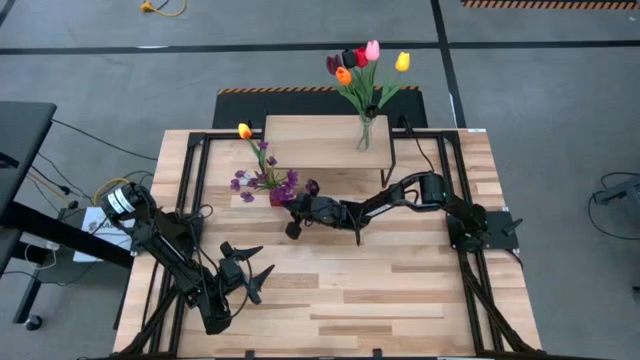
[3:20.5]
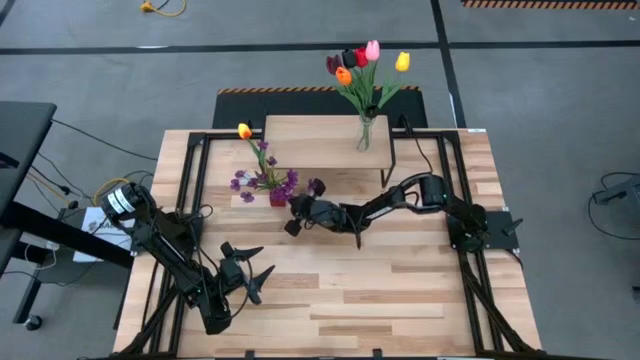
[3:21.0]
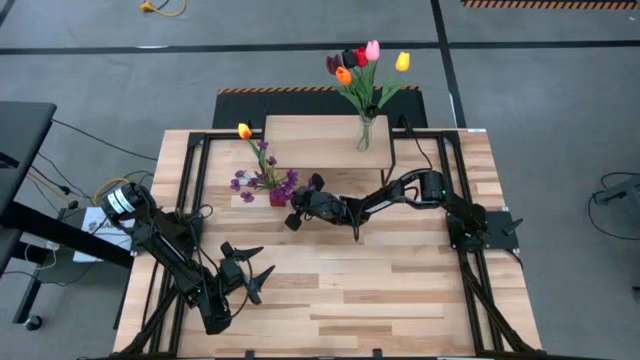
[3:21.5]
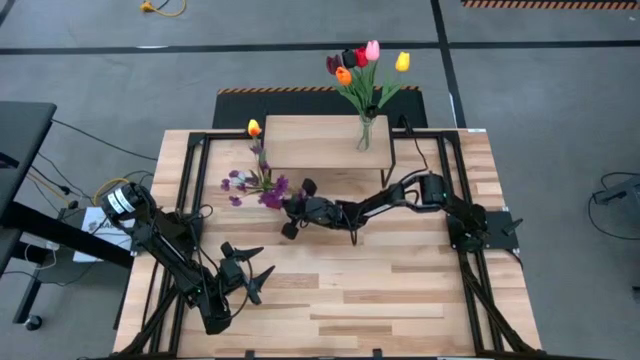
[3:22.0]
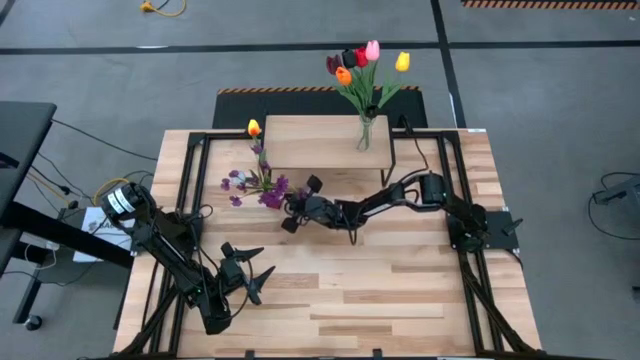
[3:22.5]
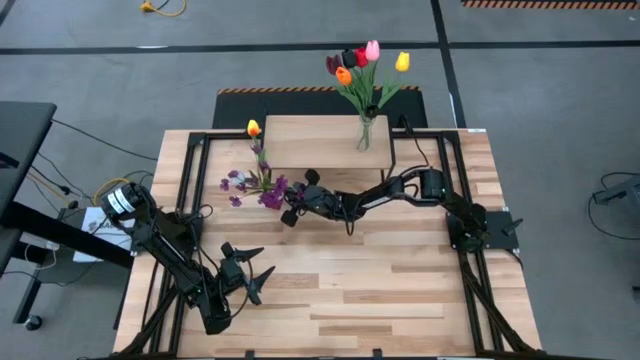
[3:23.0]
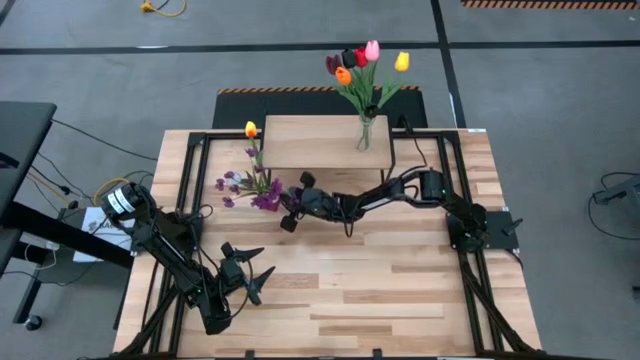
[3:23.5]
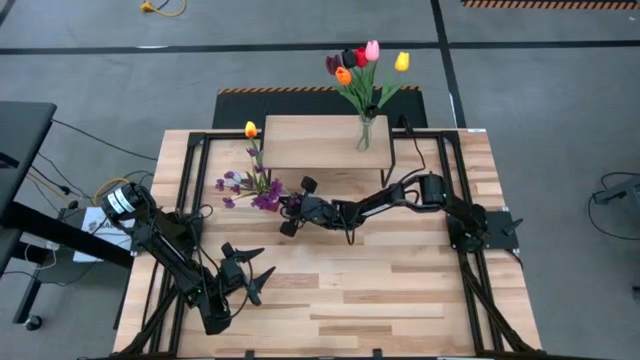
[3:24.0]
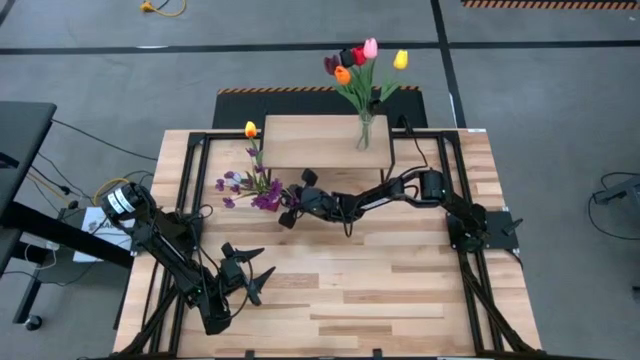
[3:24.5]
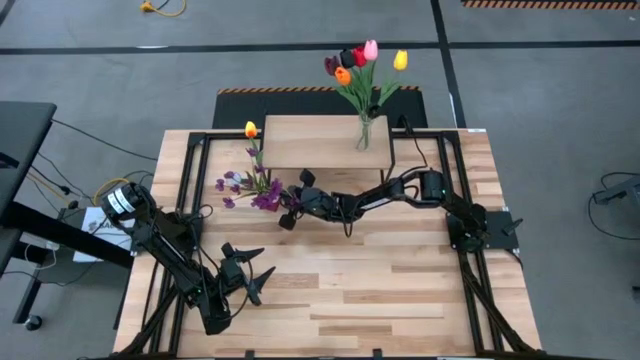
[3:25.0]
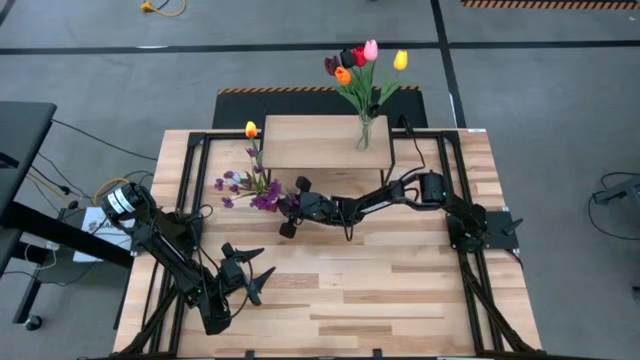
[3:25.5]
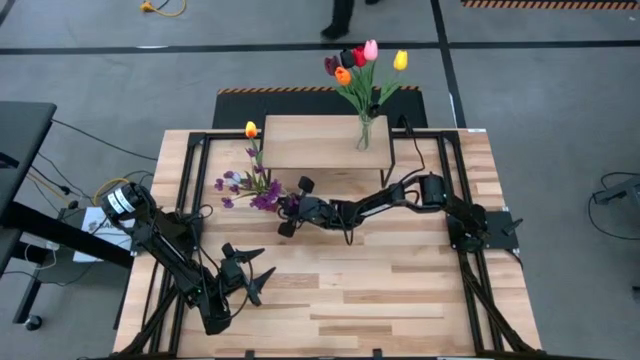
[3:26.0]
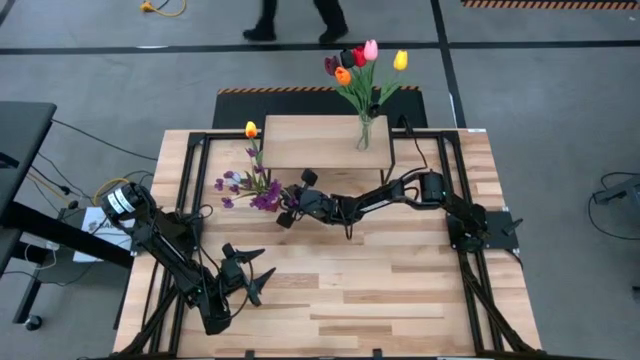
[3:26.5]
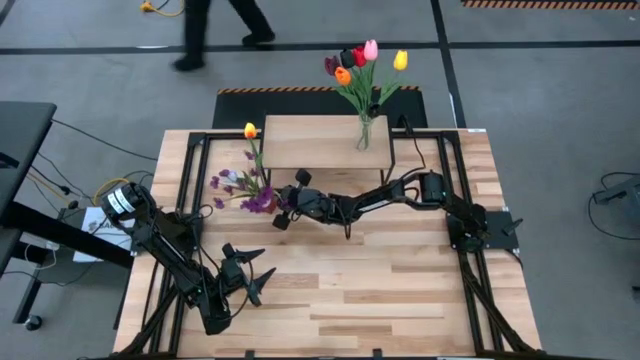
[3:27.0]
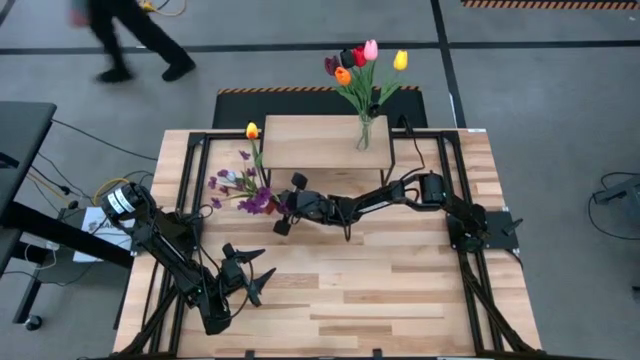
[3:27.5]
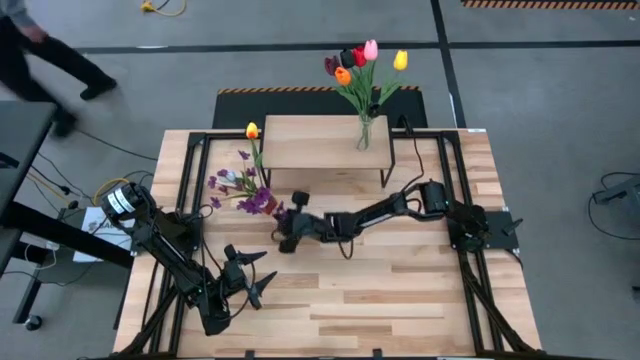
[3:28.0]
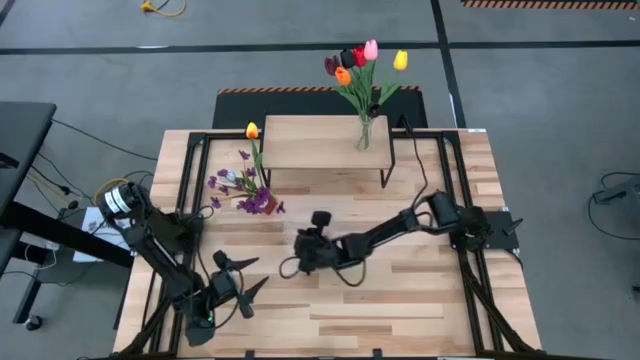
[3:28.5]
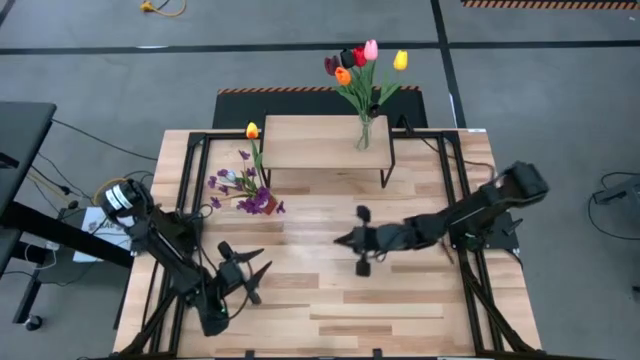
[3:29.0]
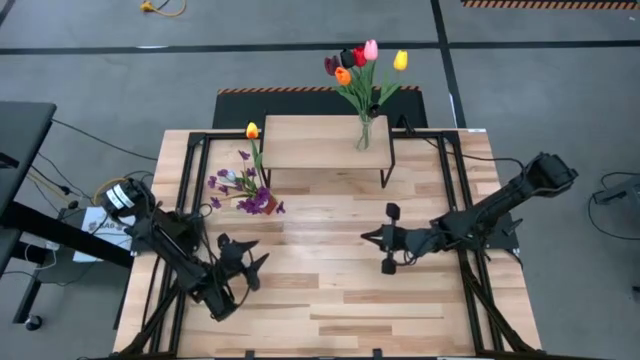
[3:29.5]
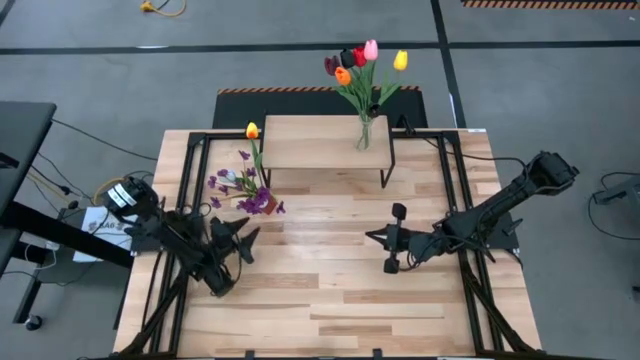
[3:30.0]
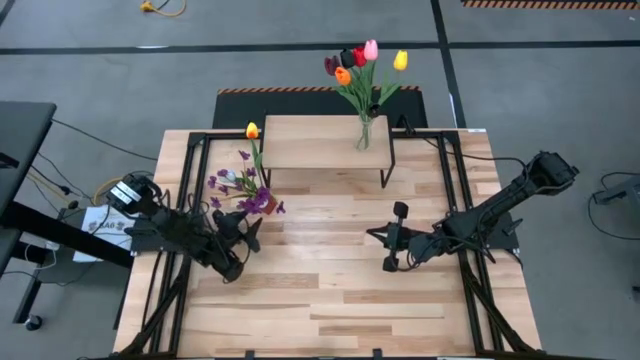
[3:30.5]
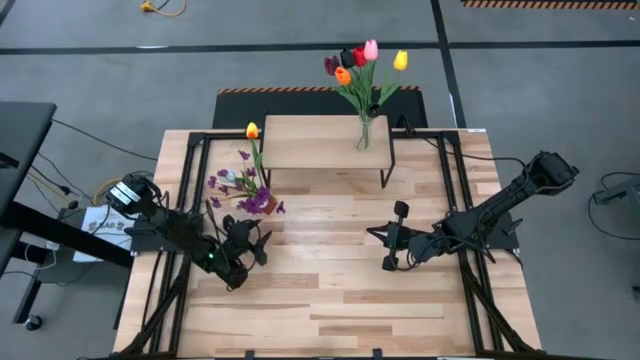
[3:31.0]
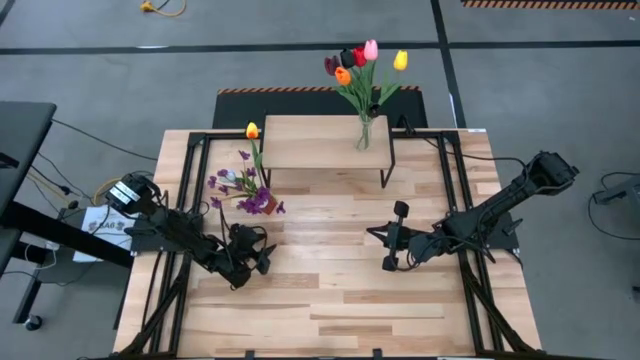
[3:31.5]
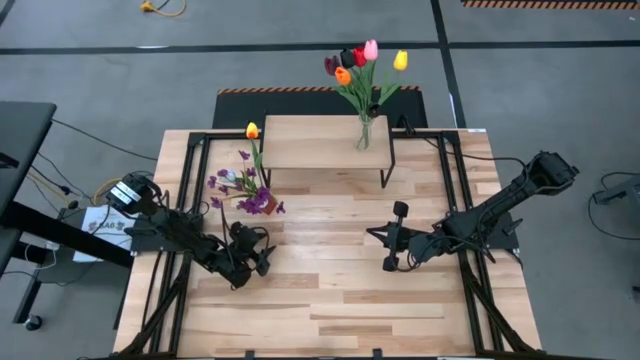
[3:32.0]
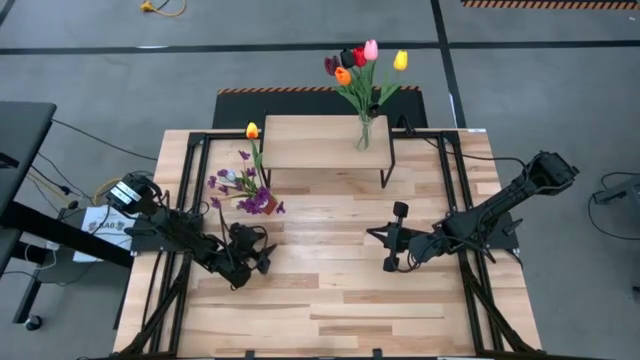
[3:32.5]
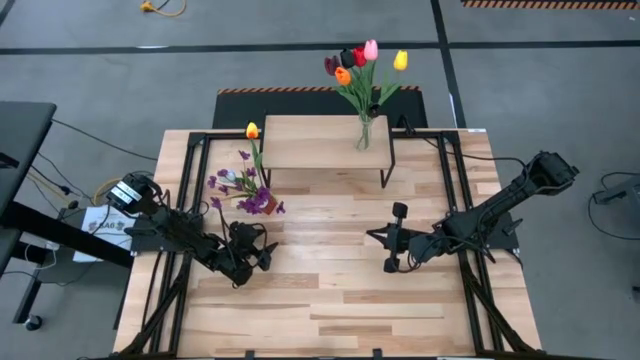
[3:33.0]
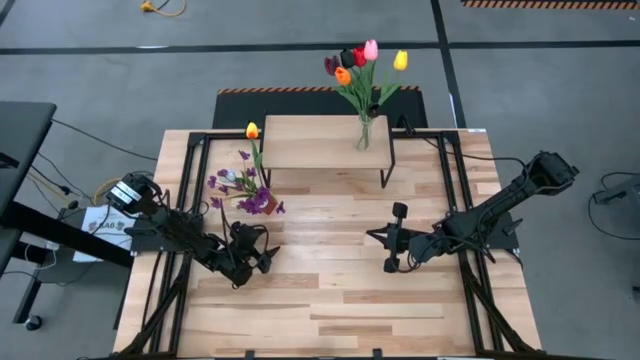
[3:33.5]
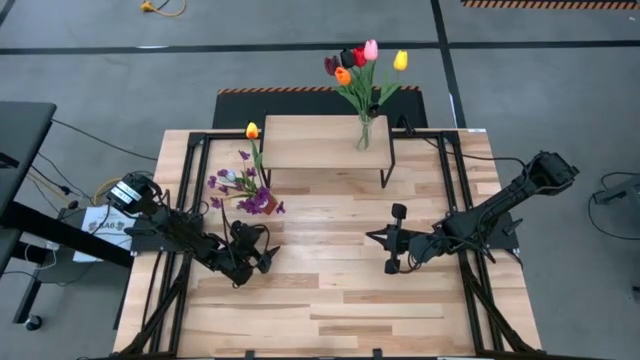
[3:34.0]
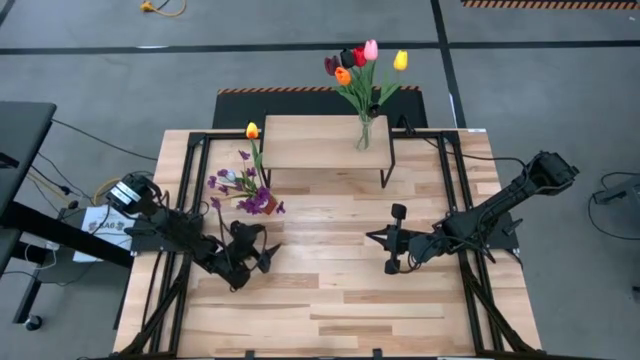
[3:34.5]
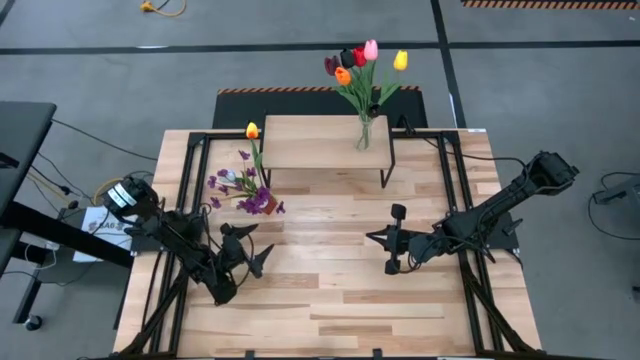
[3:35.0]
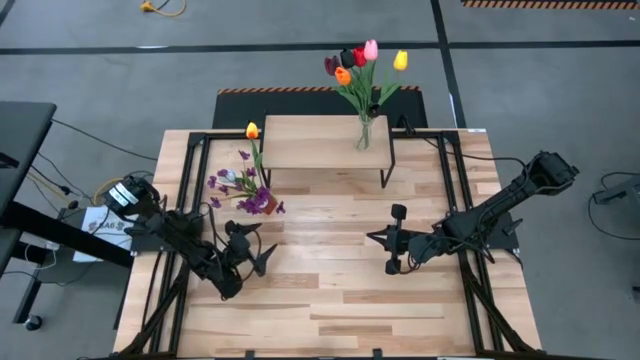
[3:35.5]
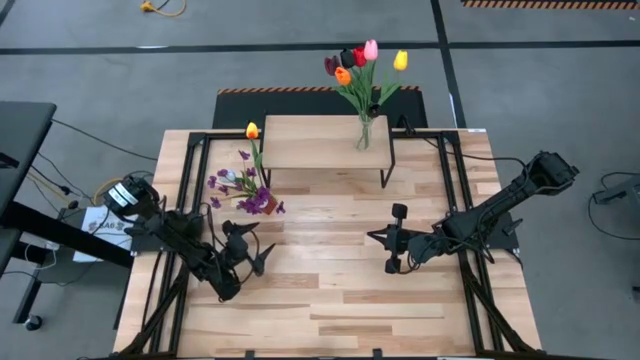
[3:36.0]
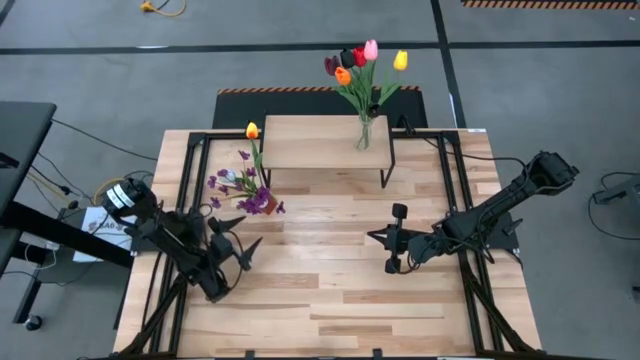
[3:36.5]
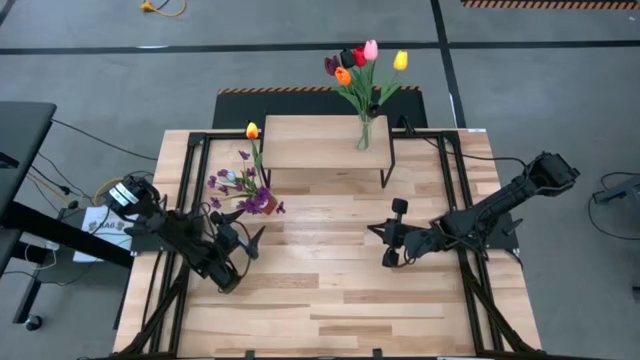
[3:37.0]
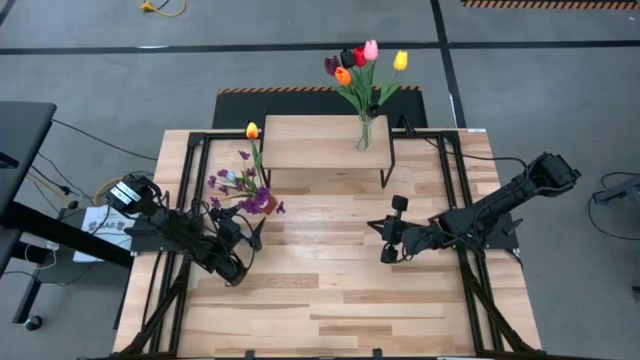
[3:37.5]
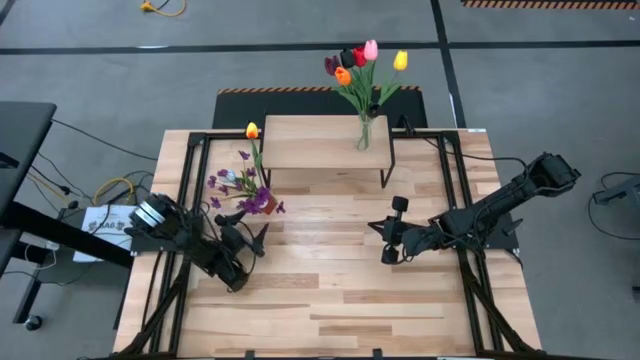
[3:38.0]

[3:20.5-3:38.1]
Task: Pick and place flowers into a vace then onto a shelf
Put the red vase filled with flowers on the shelf

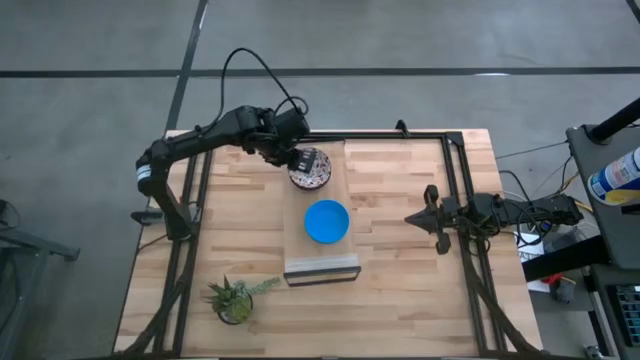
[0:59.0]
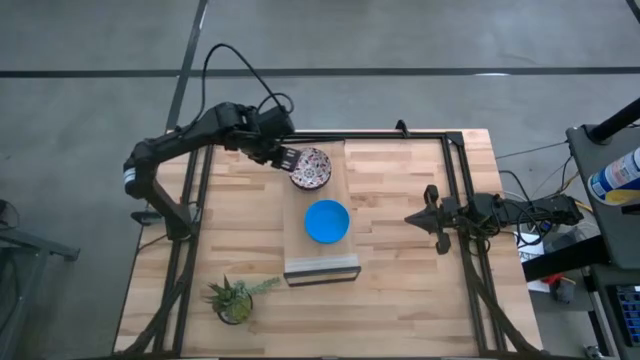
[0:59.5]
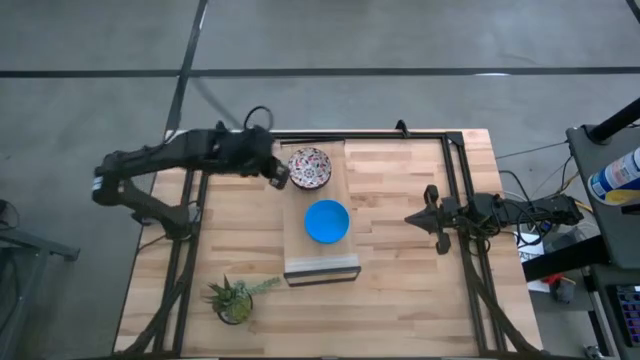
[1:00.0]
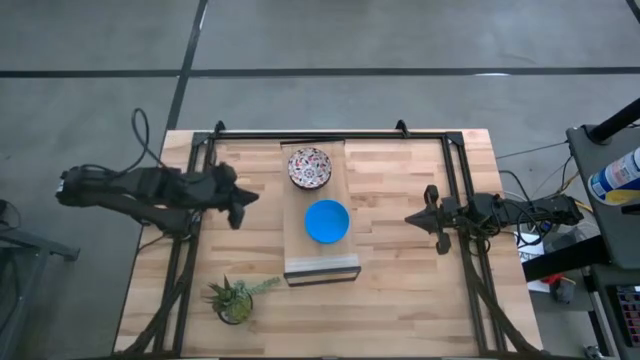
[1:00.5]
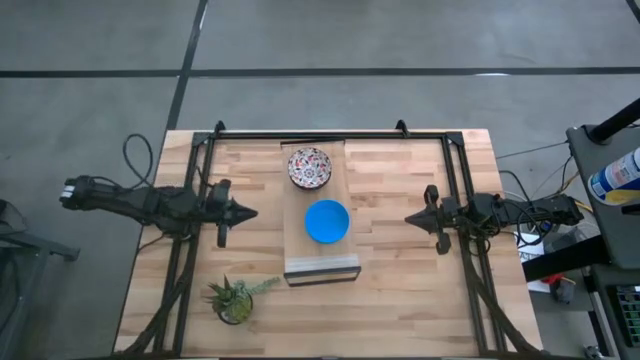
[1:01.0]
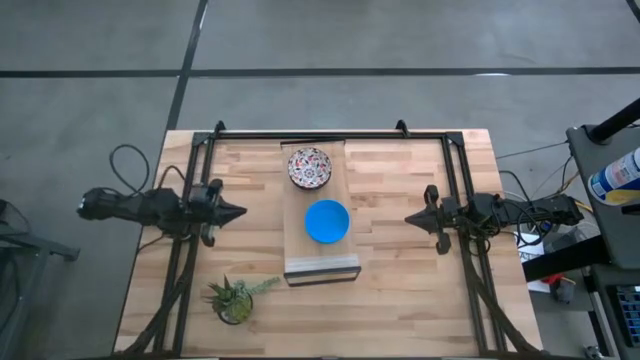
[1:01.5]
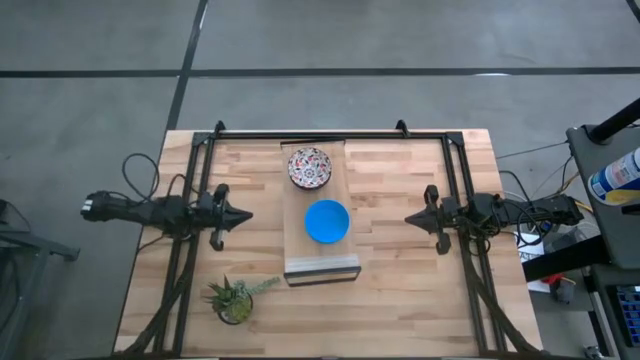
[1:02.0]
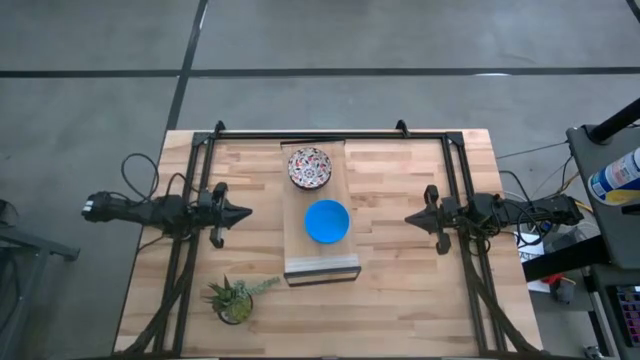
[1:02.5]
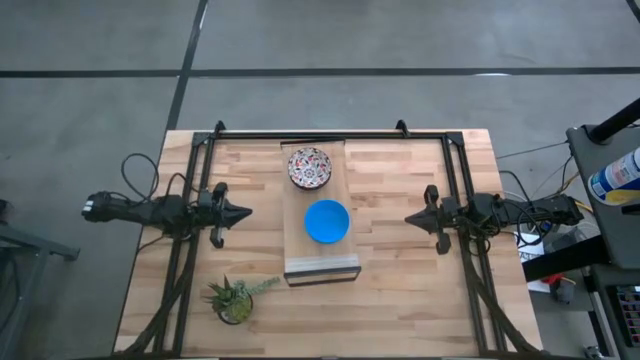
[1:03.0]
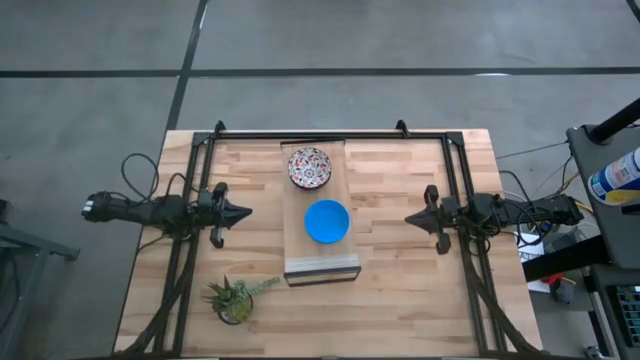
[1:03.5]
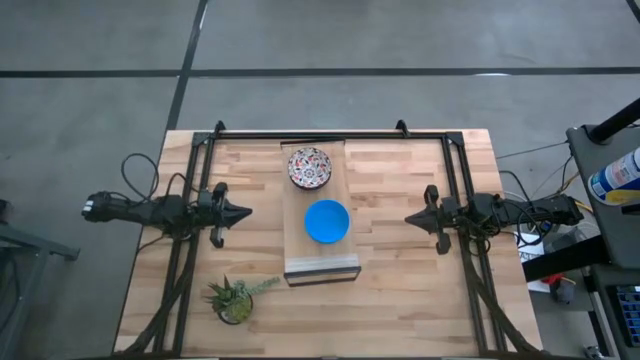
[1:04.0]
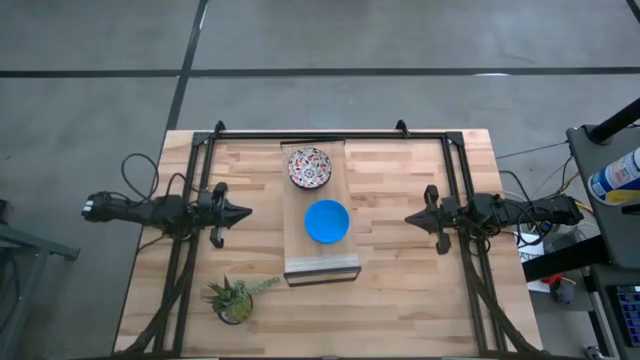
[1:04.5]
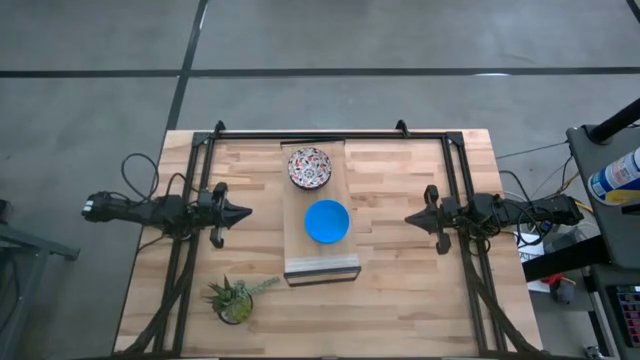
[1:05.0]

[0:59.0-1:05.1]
Task: Pick & Place Mini bowls
Return to Home Position
